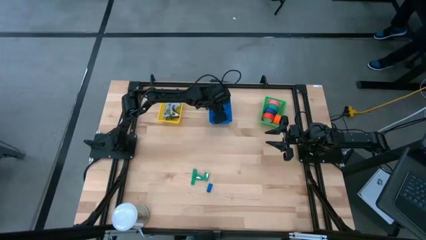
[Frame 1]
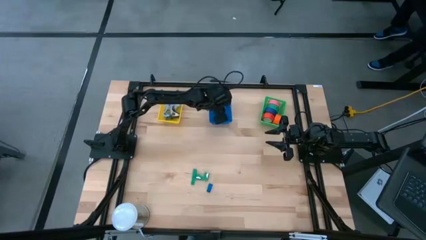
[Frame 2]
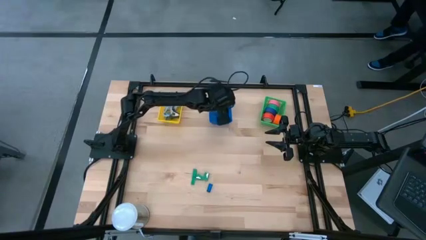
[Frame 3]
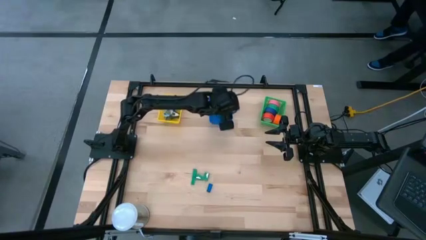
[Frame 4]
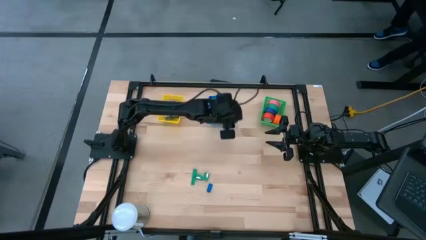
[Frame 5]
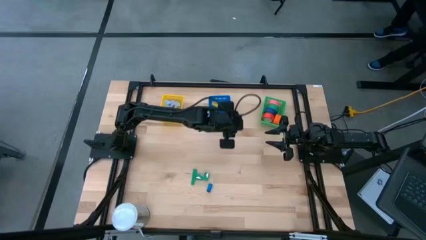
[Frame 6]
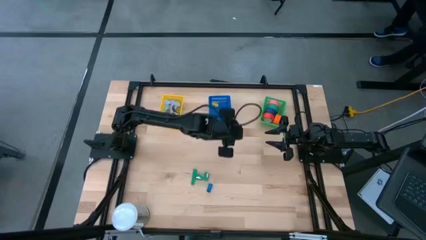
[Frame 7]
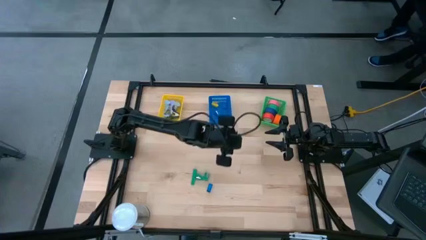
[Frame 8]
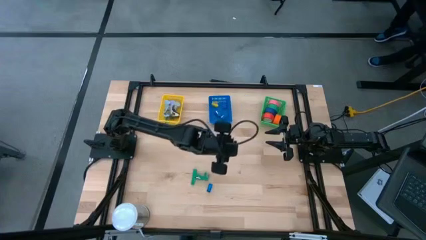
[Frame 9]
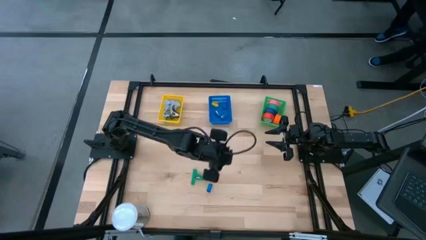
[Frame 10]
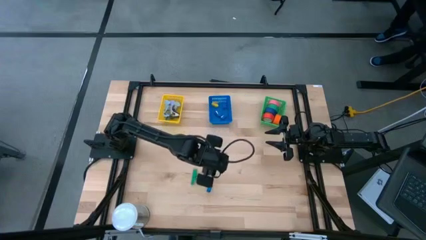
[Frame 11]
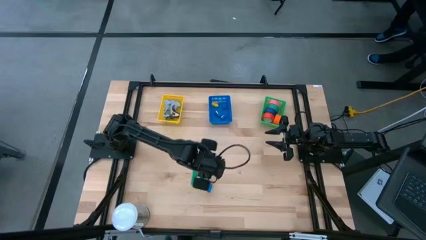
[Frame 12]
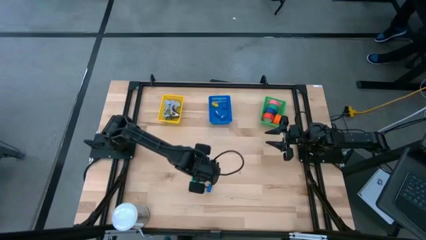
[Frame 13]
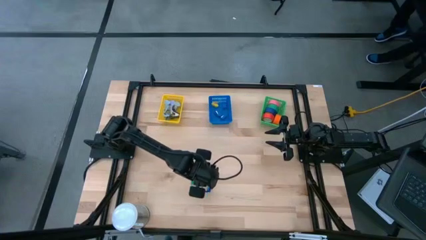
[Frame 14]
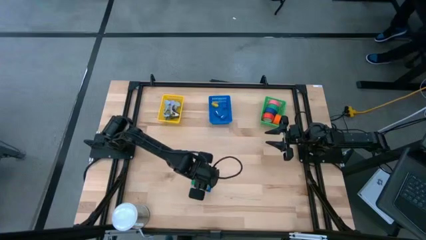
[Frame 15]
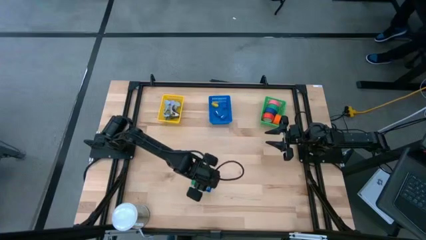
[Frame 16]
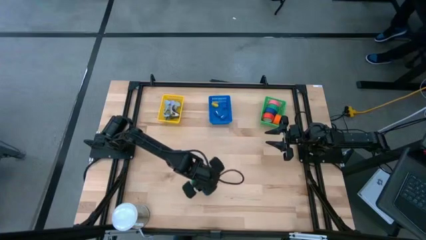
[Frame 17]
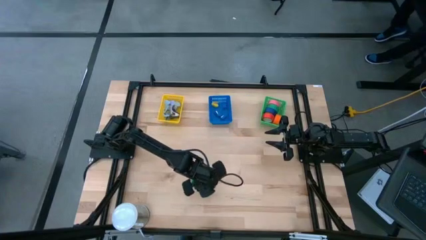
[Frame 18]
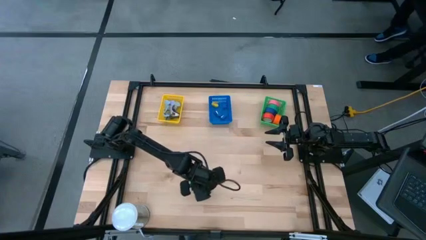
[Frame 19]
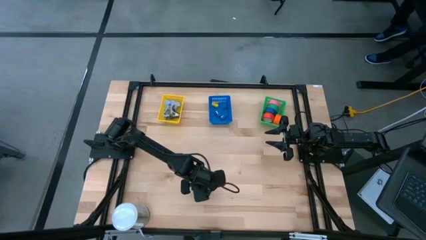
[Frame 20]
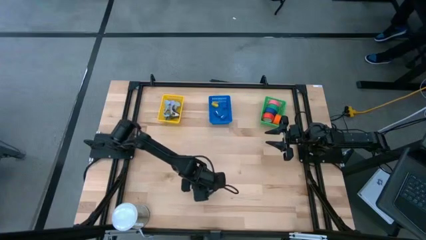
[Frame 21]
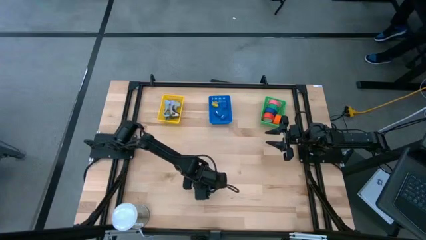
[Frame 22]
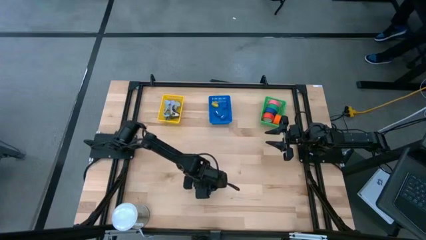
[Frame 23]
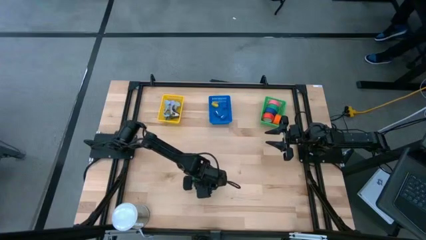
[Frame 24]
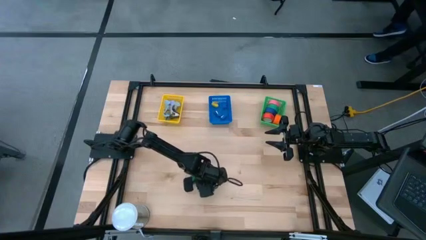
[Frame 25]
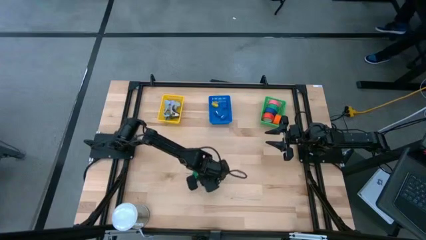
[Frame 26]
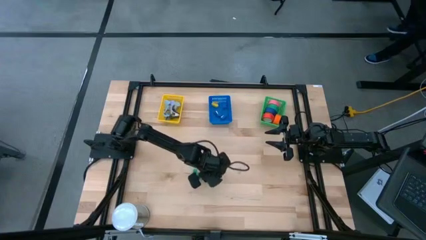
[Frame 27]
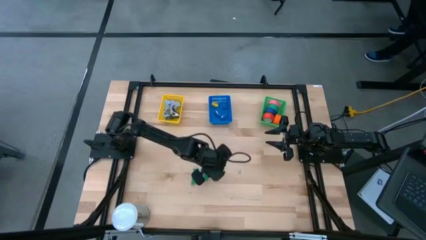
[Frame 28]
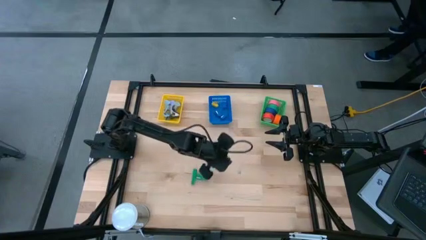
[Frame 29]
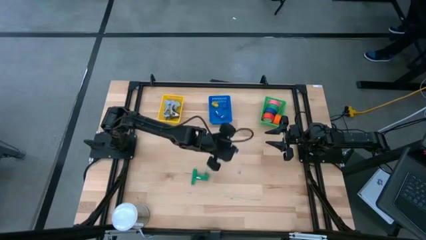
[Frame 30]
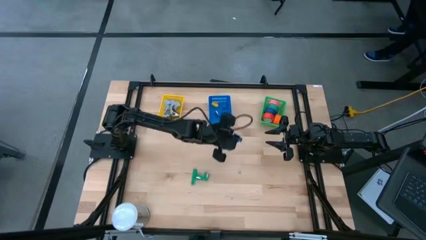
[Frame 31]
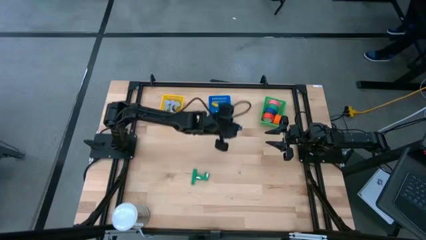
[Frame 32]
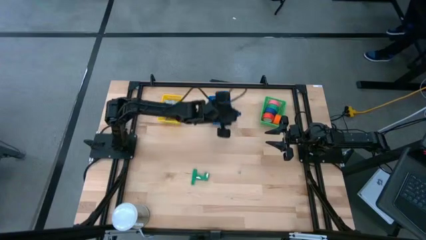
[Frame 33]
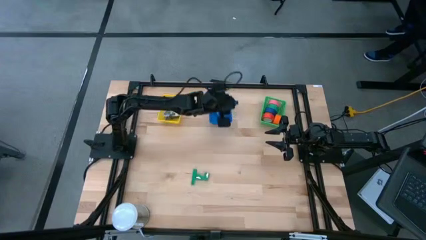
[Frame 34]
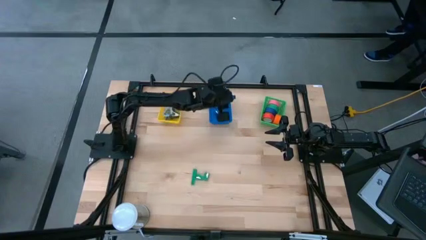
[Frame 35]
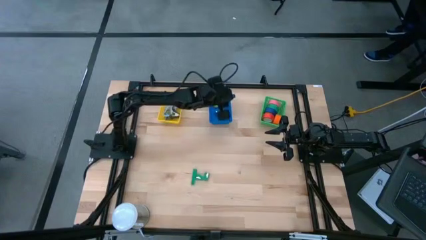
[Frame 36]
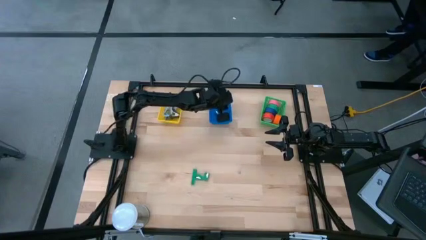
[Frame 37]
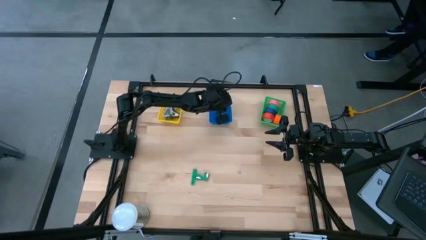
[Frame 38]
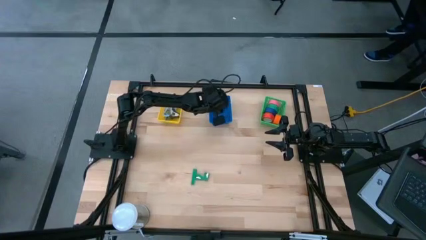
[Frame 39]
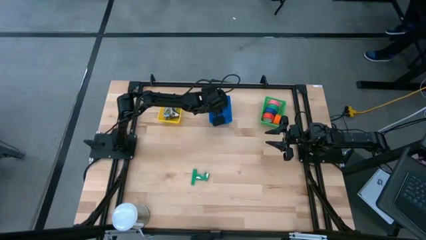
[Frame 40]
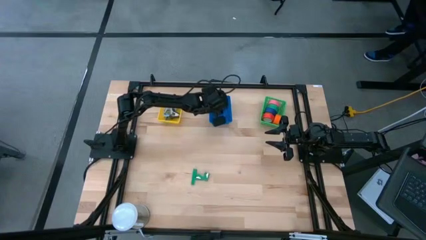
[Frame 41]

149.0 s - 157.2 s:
Task: Pick and place Stapler, Stapler remover, tape
Put the blue stapler into the blue basket

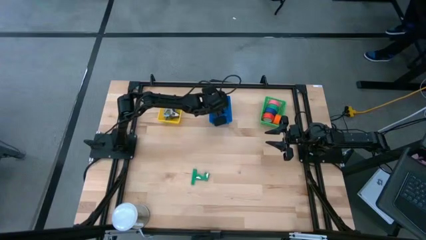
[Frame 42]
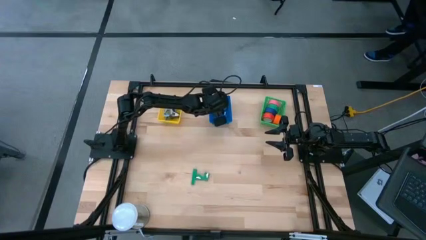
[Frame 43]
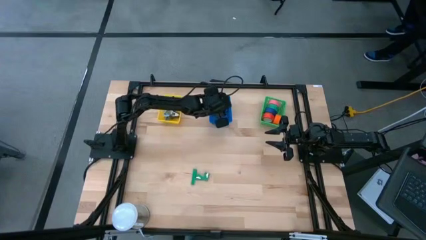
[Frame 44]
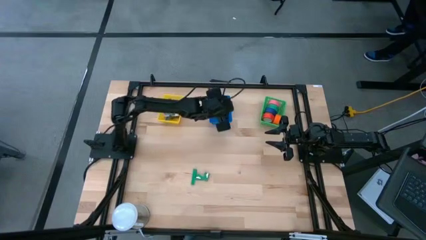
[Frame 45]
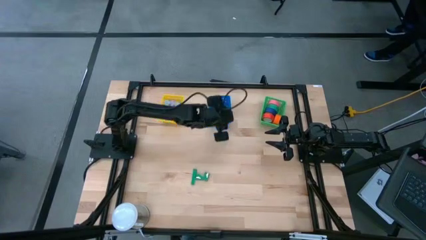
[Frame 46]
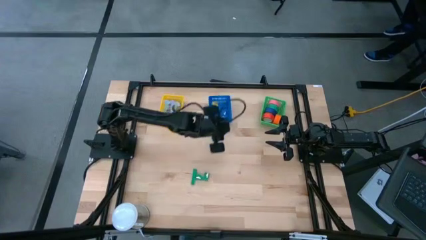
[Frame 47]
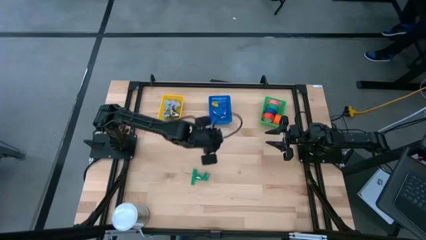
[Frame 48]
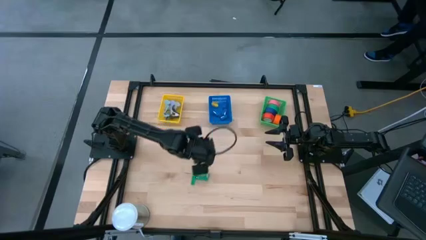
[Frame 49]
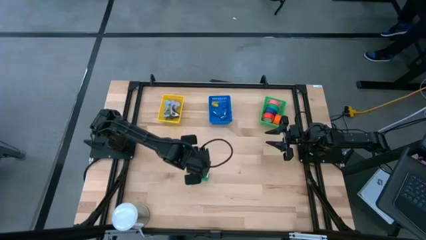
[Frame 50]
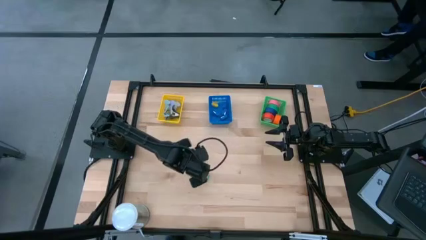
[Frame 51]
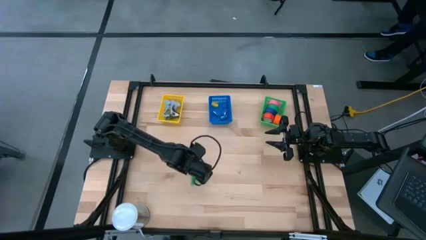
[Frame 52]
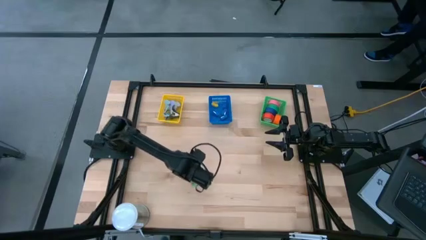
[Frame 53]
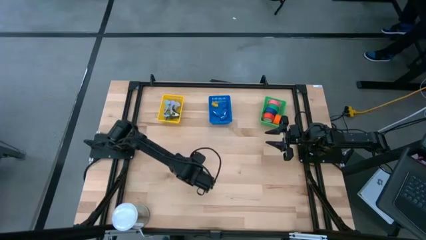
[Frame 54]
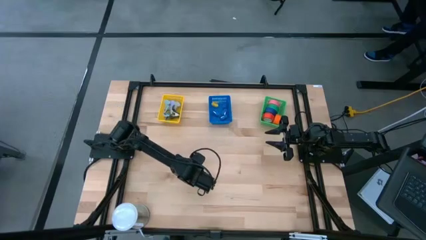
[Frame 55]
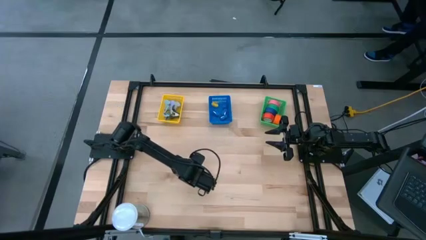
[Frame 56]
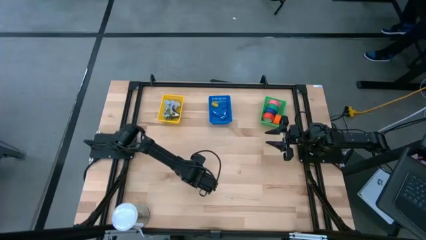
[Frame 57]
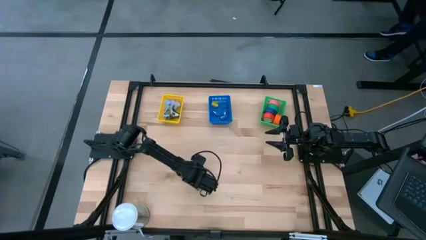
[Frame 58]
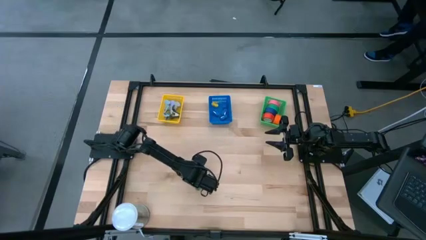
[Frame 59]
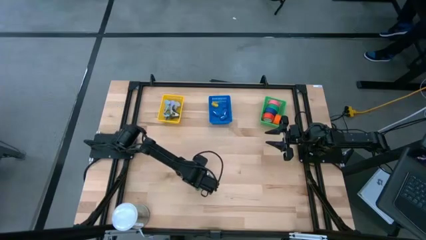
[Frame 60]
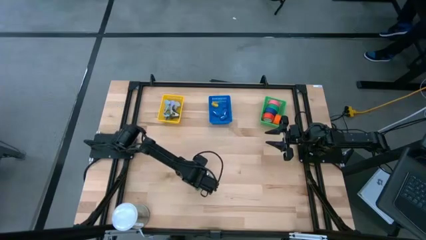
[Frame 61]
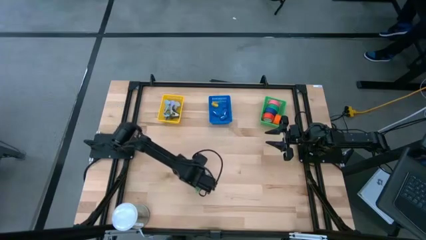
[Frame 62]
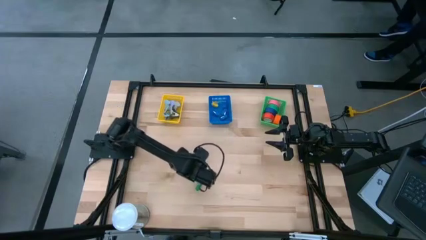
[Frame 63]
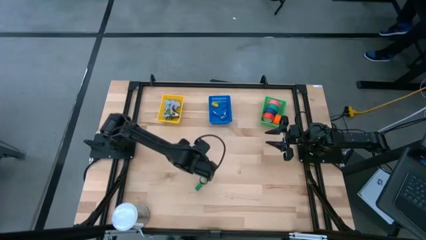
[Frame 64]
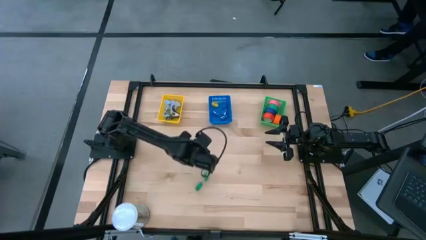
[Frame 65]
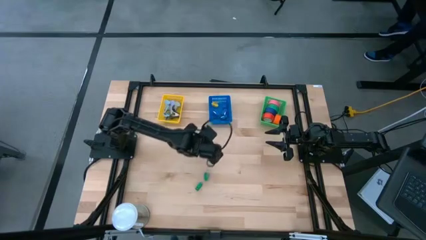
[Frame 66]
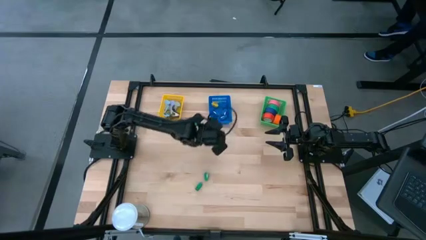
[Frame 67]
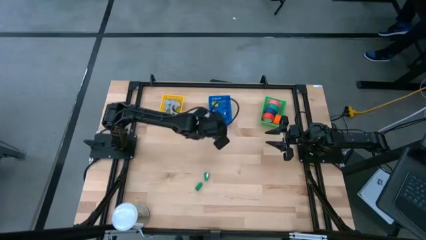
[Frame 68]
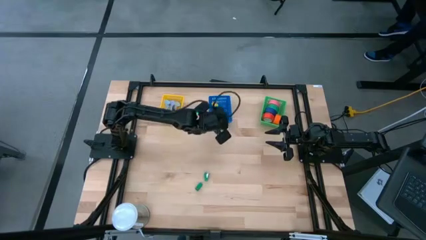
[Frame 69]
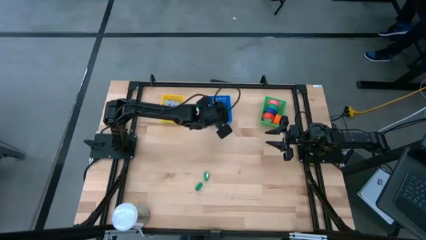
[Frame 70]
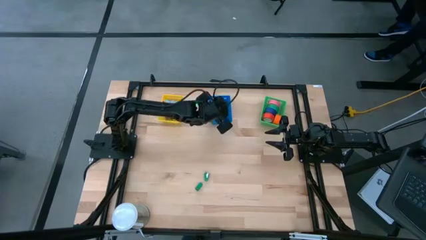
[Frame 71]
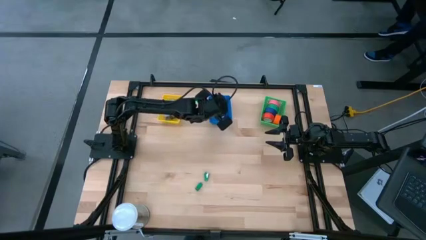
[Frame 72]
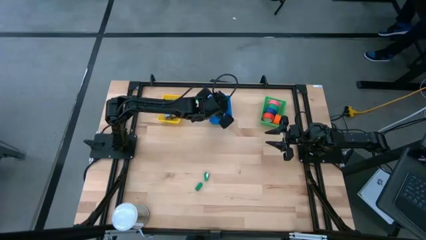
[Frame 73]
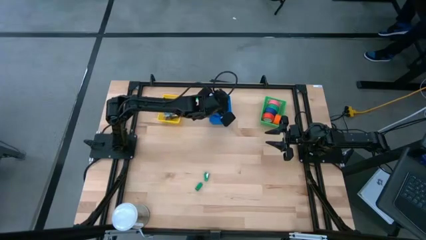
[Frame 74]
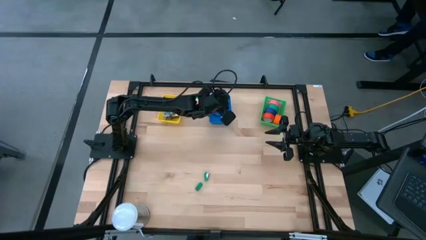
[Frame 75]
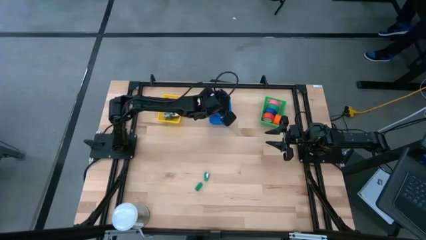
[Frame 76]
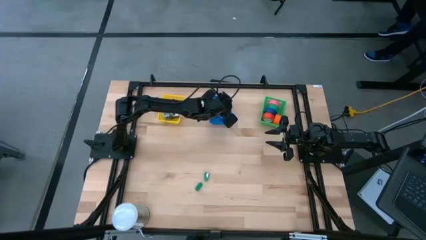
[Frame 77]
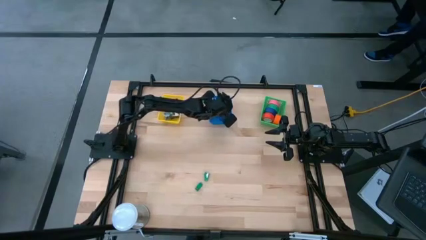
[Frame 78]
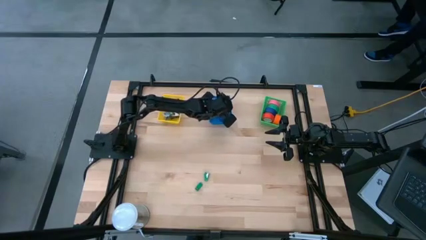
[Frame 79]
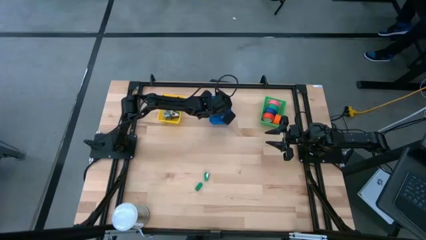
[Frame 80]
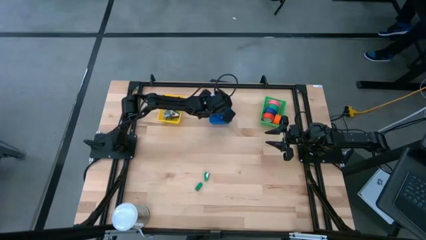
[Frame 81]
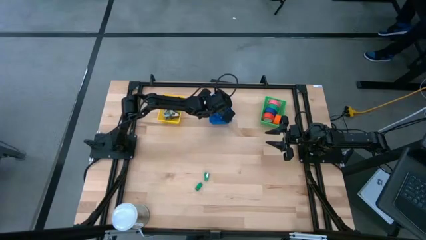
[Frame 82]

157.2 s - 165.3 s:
Put the green stapler into the blue basket
